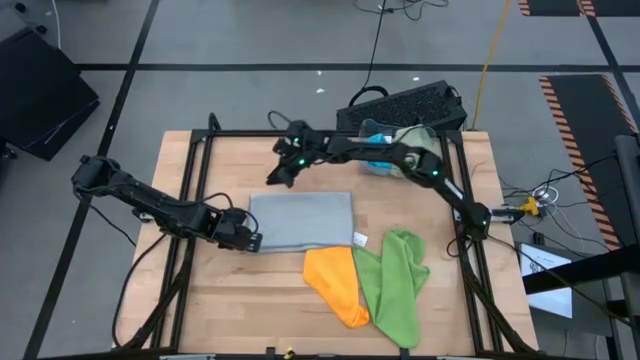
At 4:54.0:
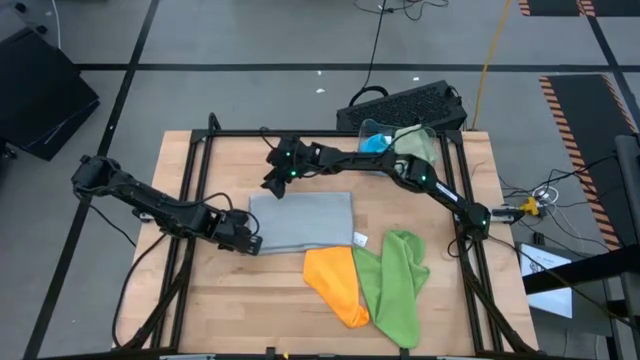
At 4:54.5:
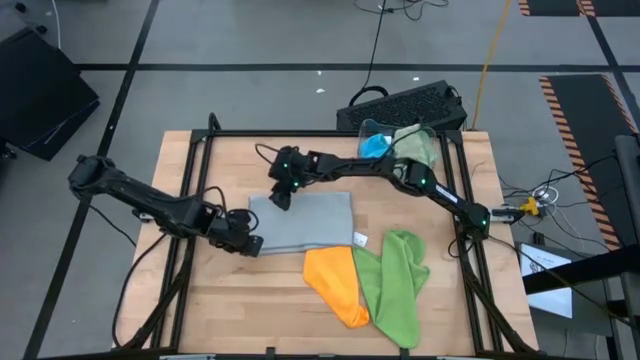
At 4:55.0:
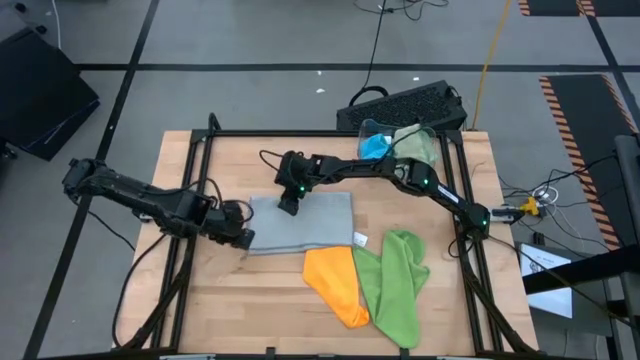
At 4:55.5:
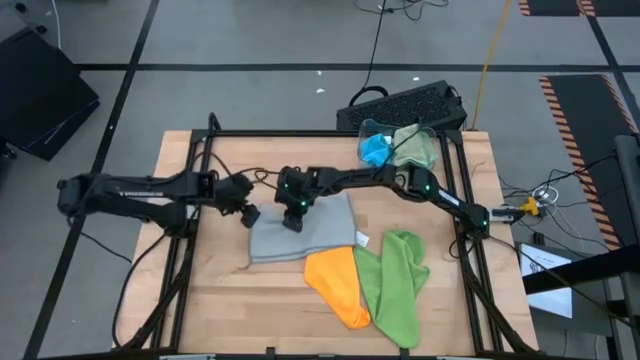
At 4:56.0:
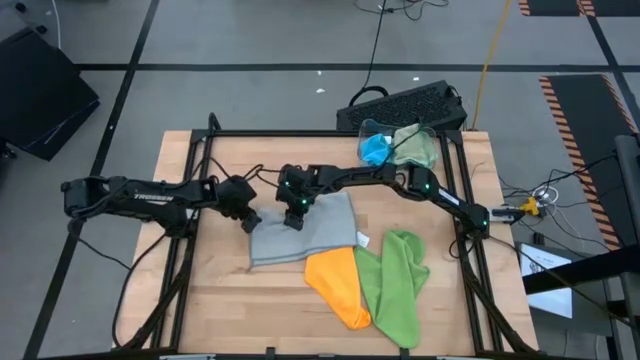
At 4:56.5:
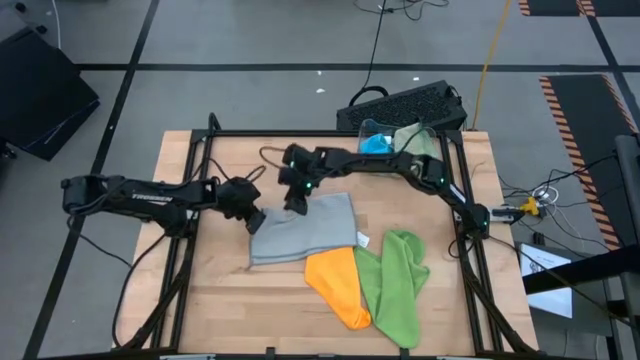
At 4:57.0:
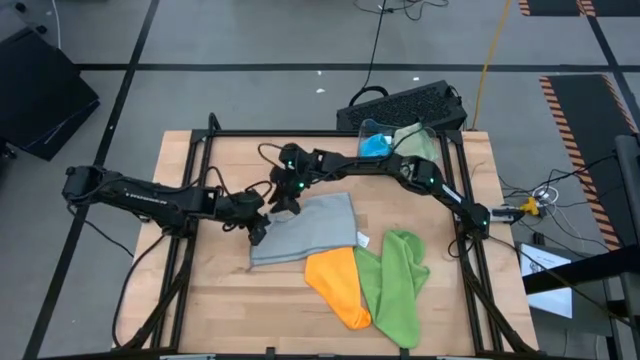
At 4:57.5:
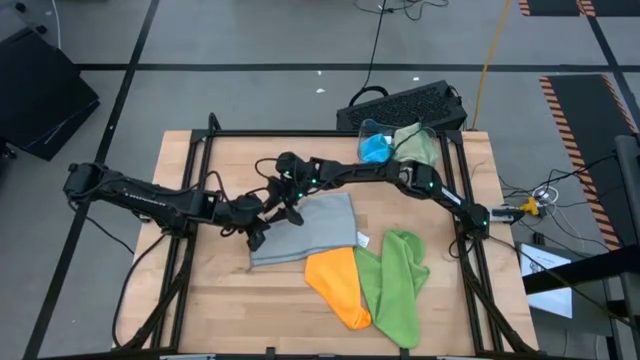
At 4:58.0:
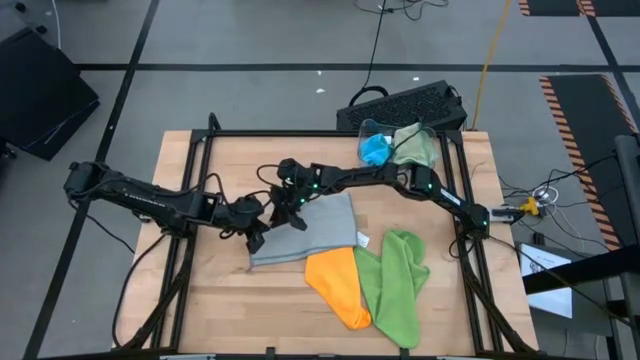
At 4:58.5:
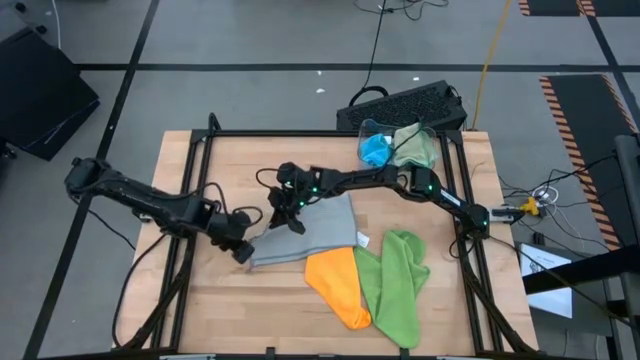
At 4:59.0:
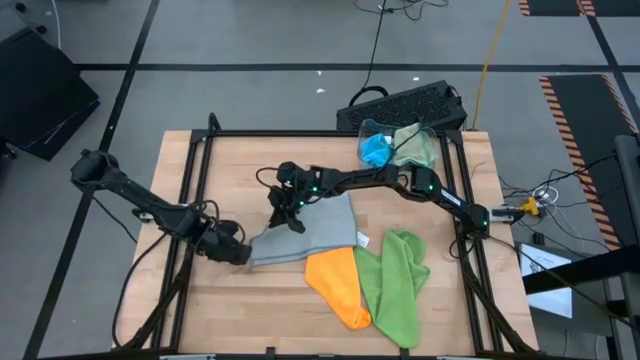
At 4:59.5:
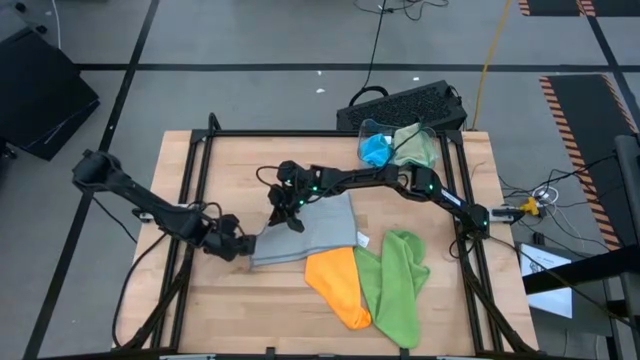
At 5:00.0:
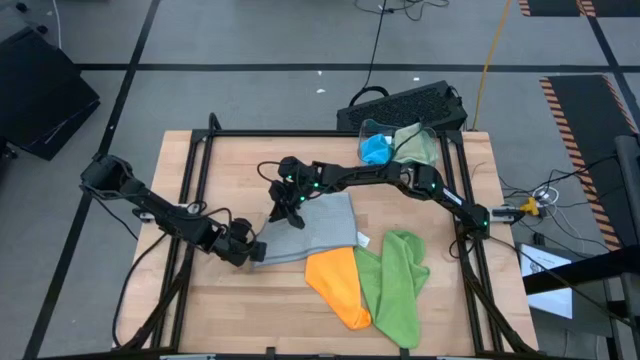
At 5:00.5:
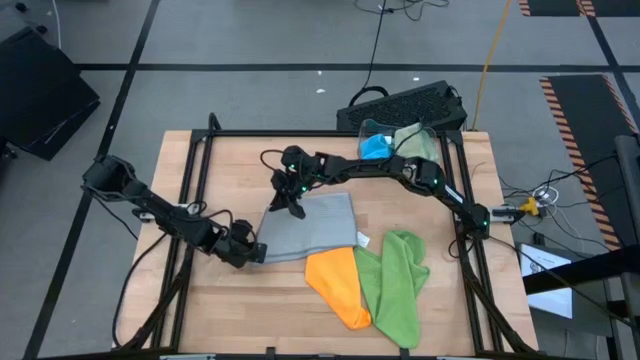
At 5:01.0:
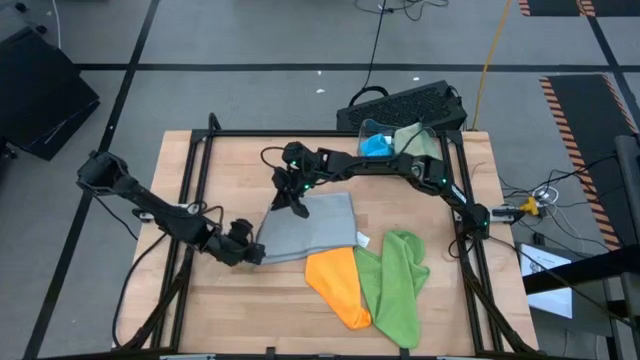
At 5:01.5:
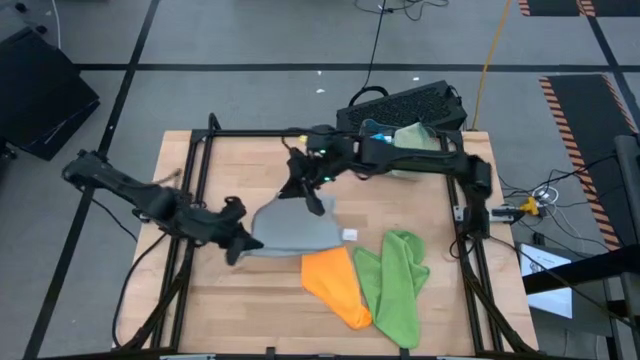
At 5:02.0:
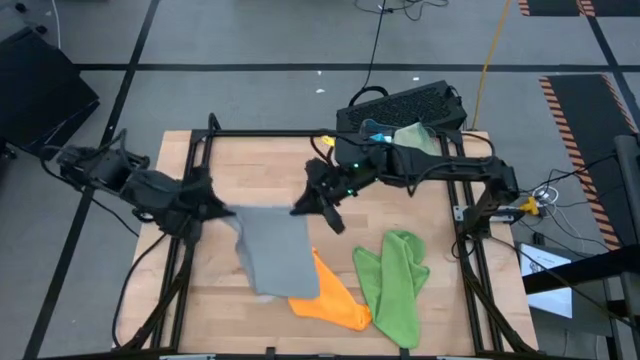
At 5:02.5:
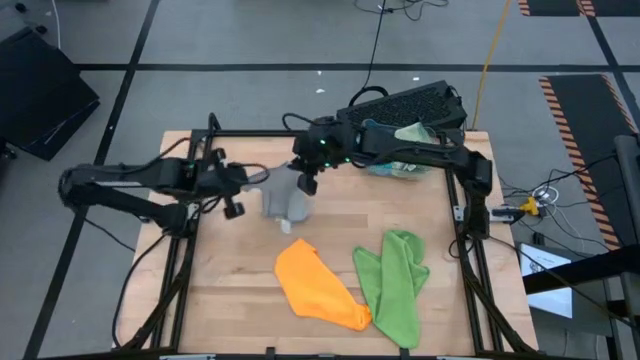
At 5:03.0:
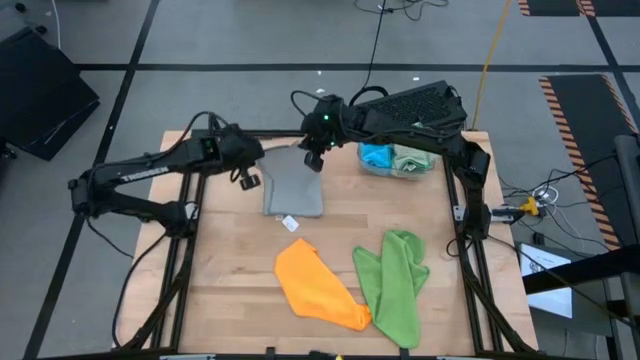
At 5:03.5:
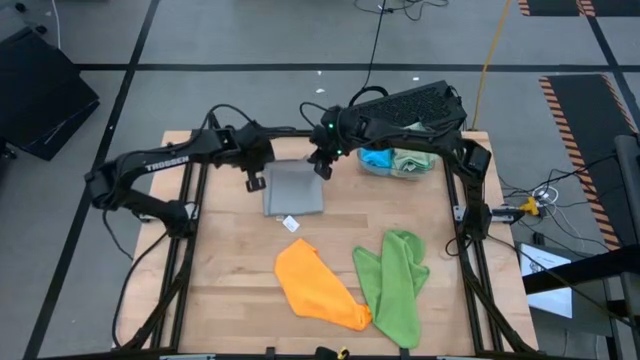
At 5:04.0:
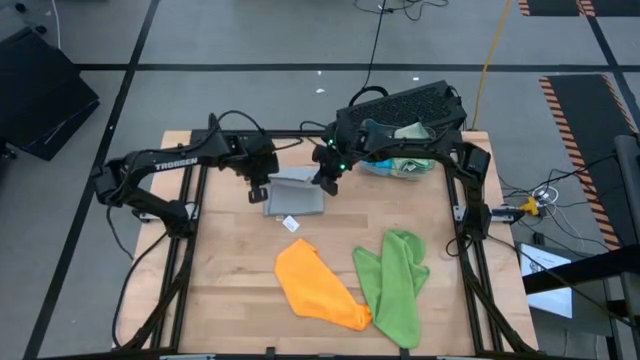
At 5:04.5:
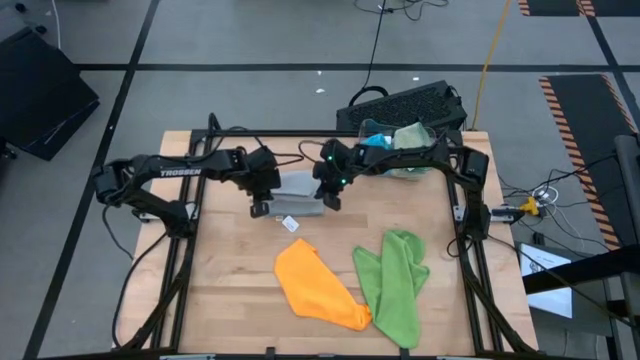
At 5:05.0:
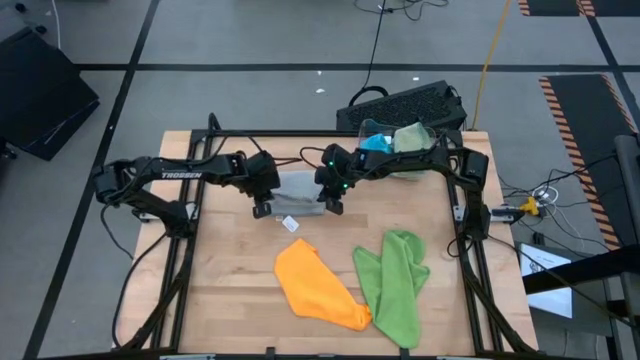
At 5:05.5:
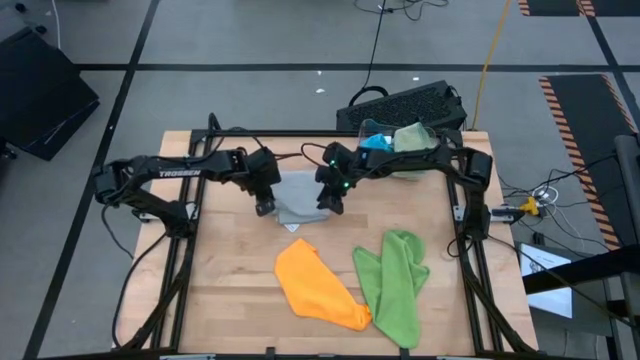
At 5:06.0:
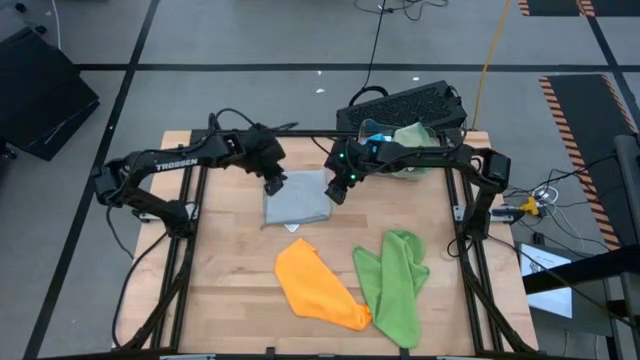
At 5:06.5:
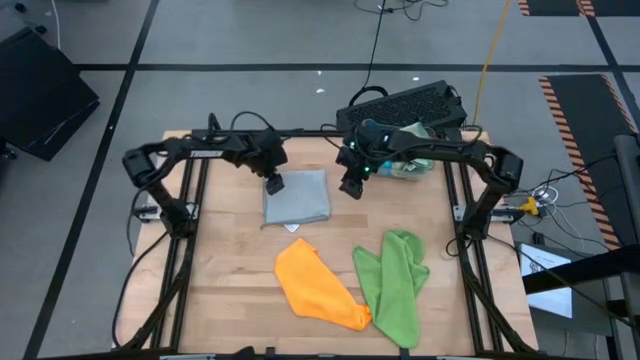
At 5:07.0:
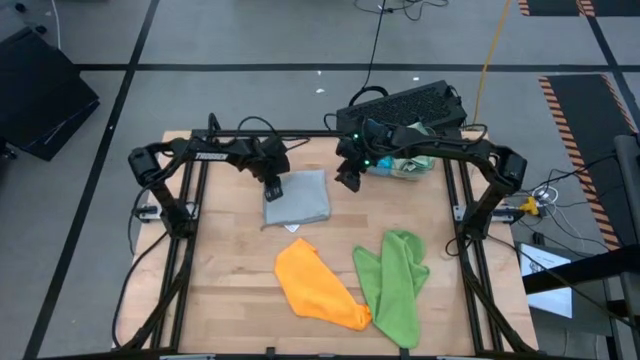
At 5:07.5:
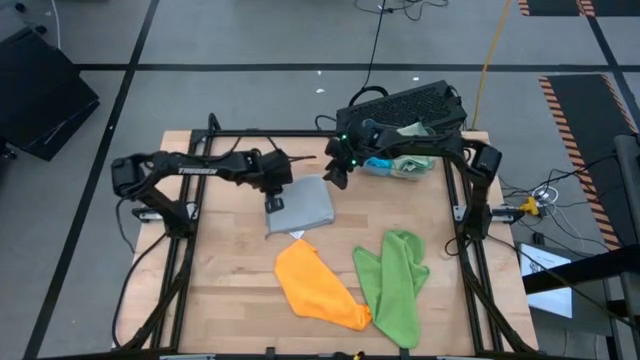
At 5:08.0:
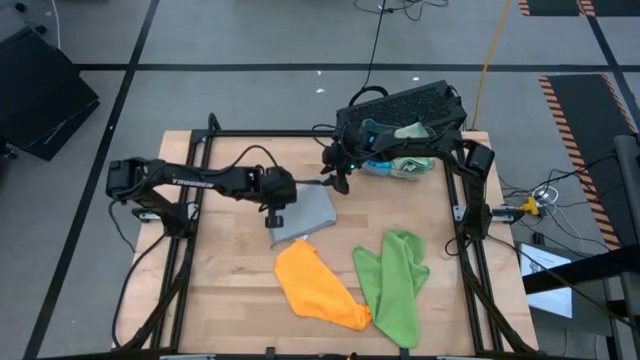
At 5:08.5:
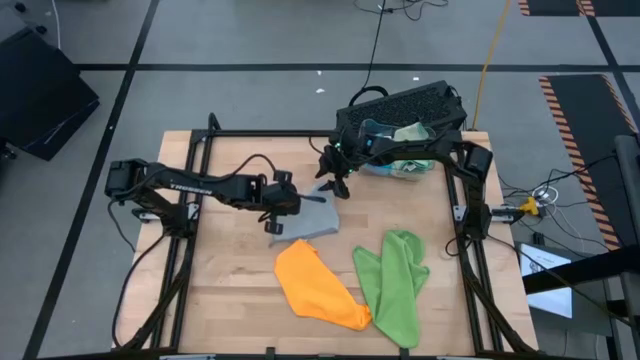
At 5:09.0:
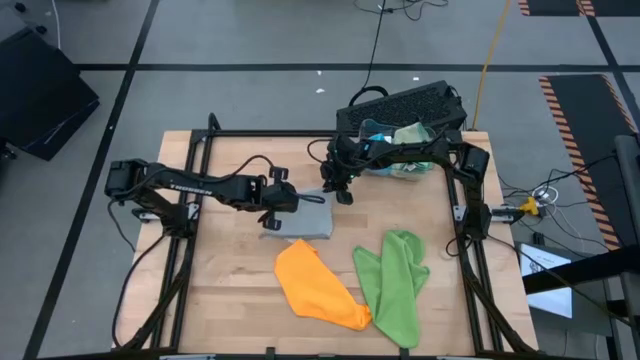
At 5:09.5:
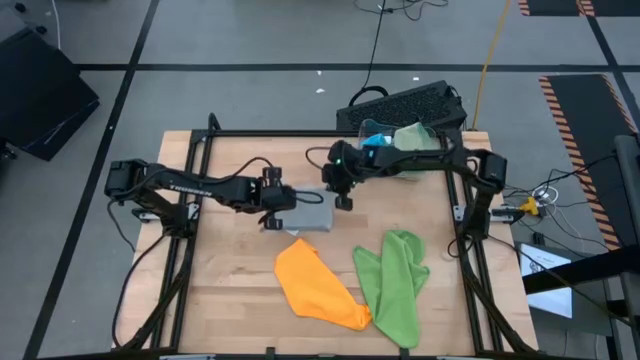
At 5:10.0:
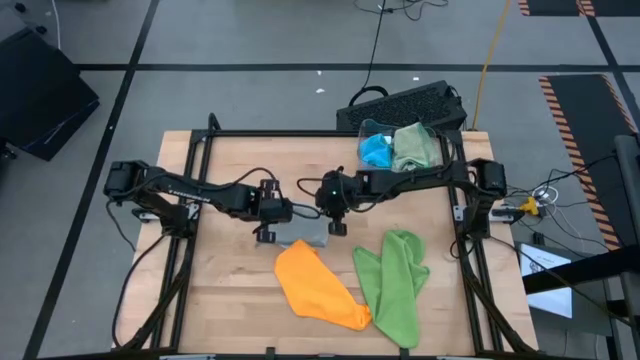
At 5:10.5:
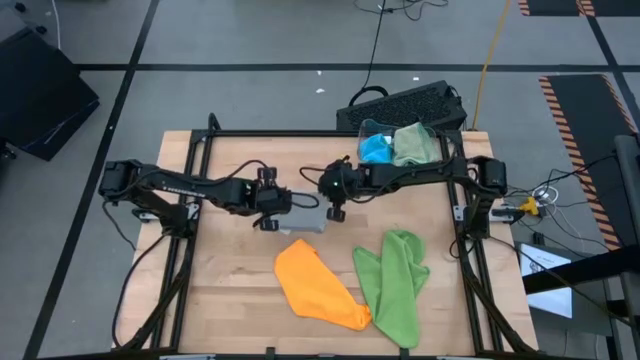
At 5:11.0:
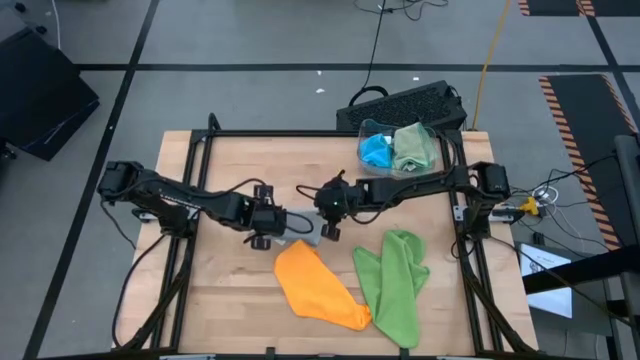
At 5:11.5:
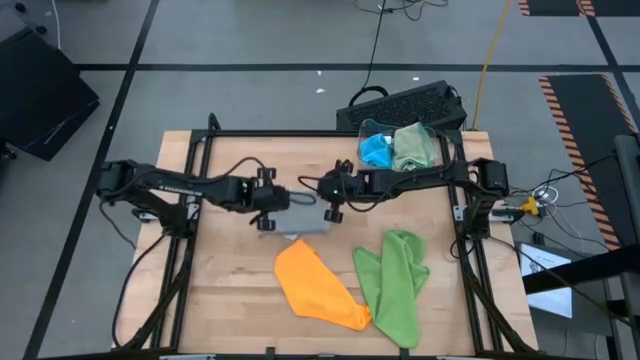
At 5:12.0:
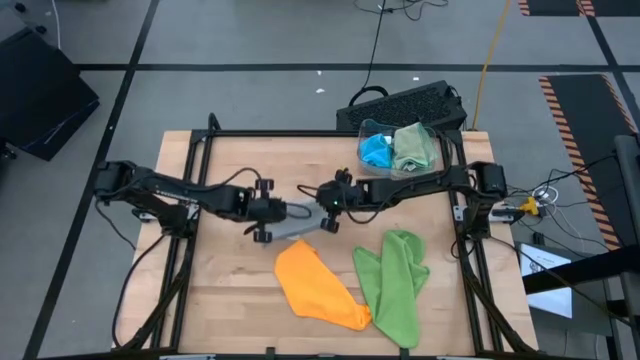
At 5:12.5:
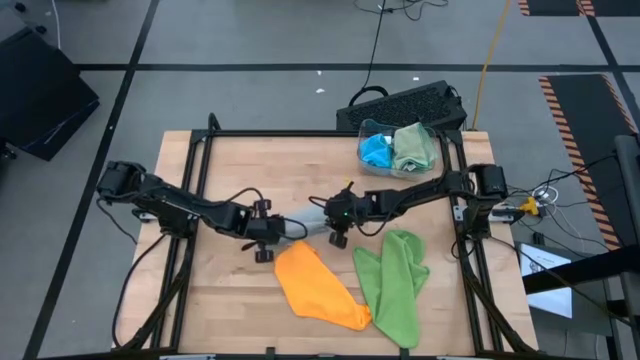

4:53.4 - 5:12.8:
Task: Fold microfiber towels
Fold the gray microfiber towel
